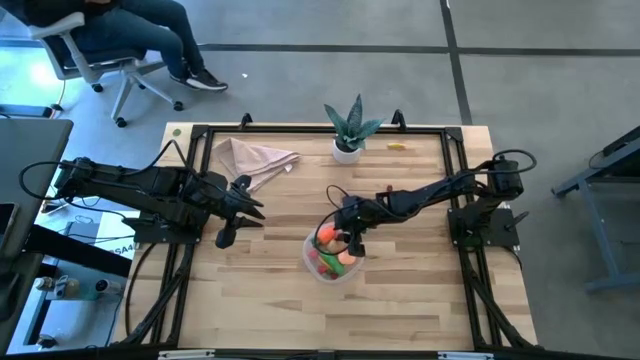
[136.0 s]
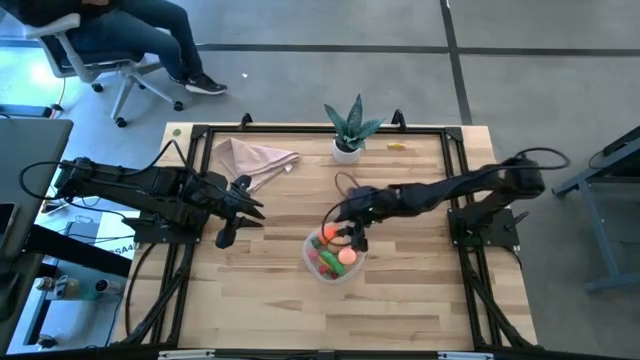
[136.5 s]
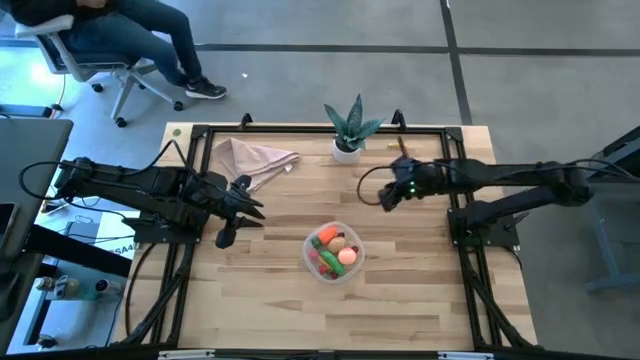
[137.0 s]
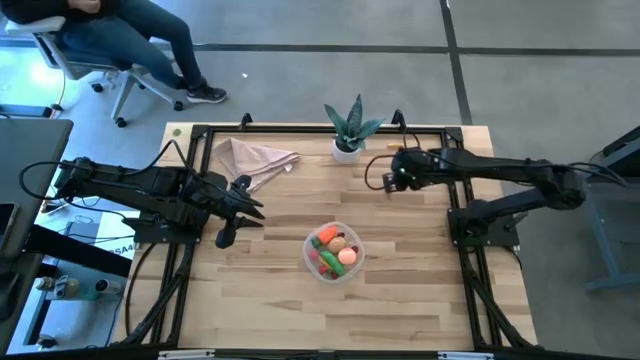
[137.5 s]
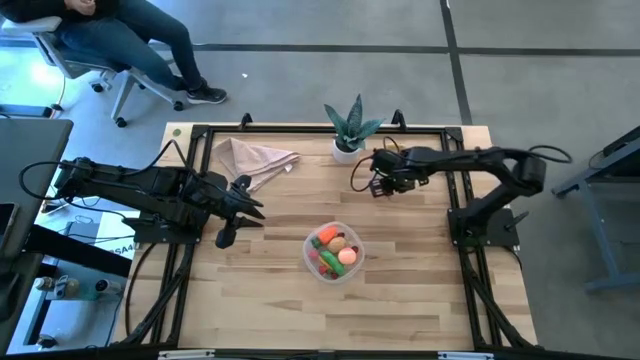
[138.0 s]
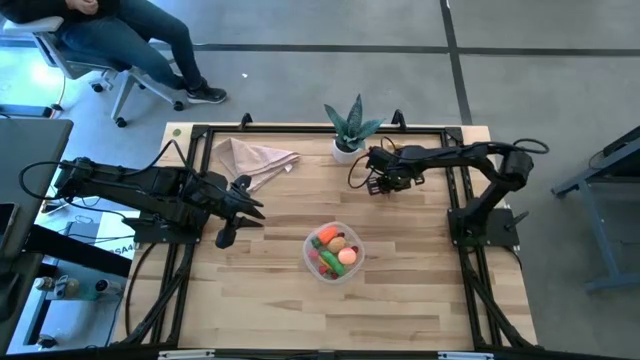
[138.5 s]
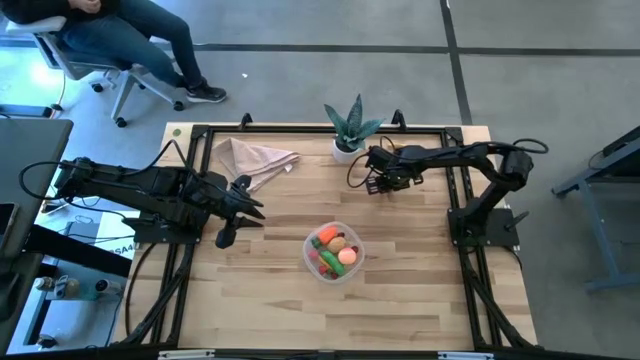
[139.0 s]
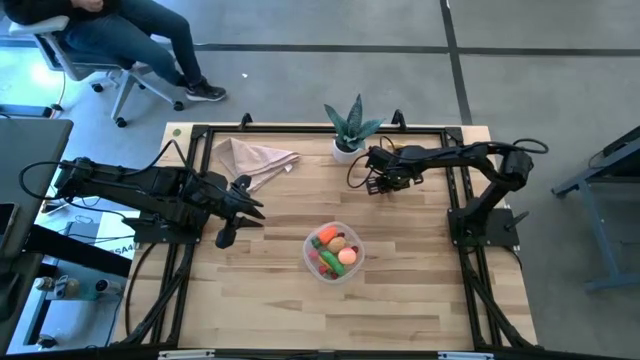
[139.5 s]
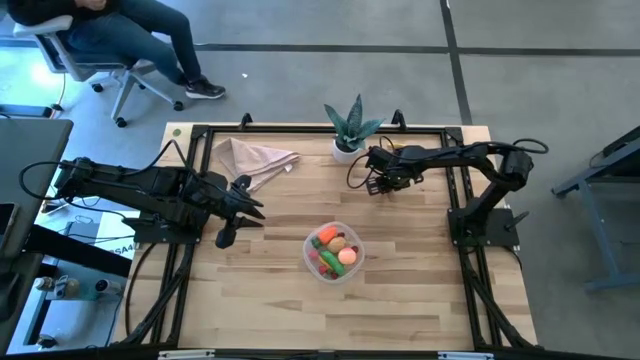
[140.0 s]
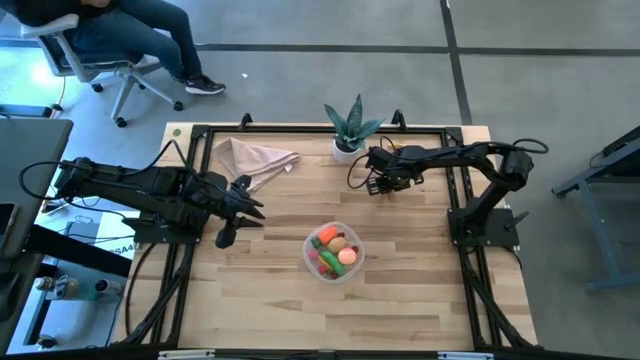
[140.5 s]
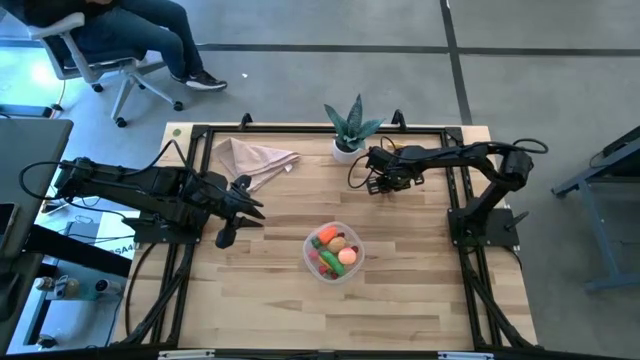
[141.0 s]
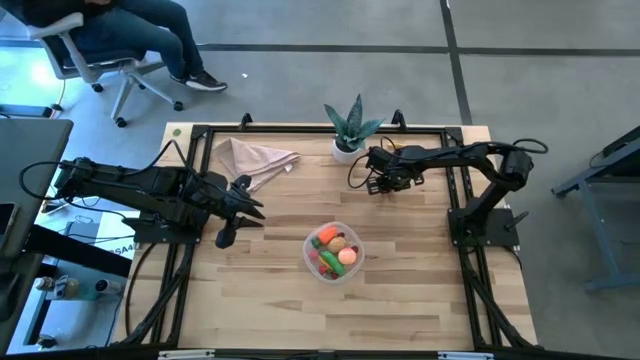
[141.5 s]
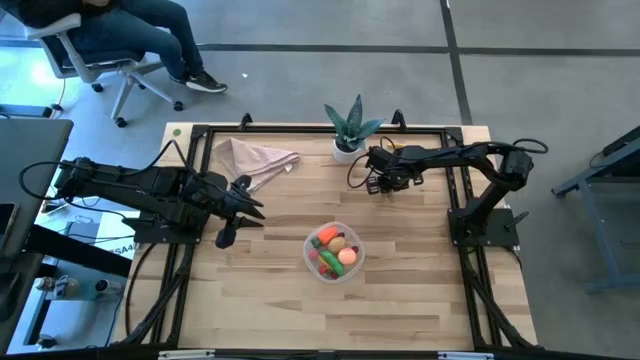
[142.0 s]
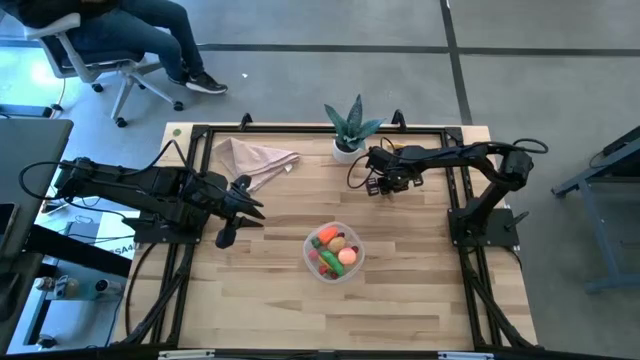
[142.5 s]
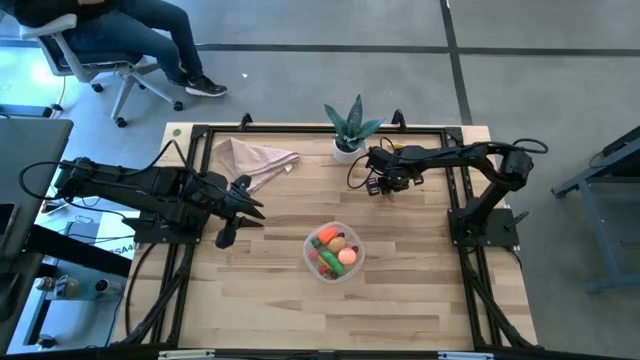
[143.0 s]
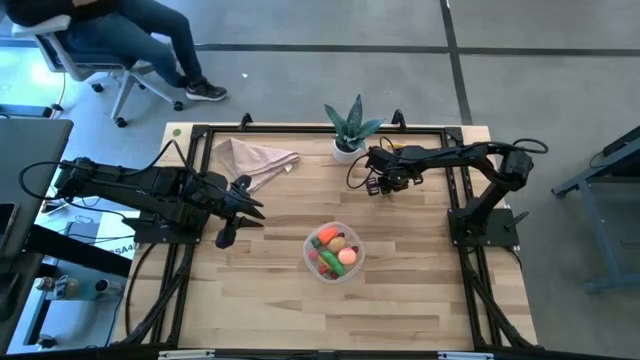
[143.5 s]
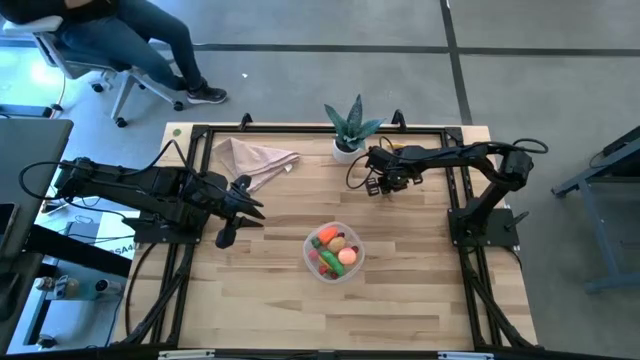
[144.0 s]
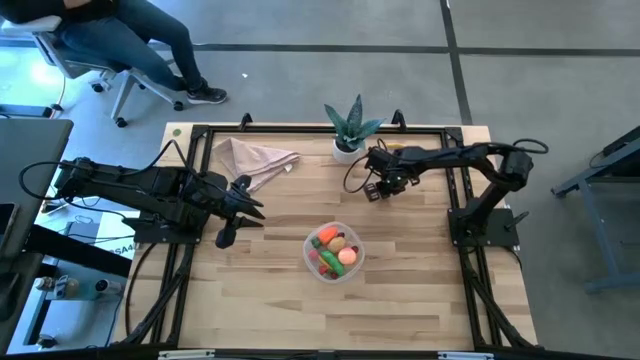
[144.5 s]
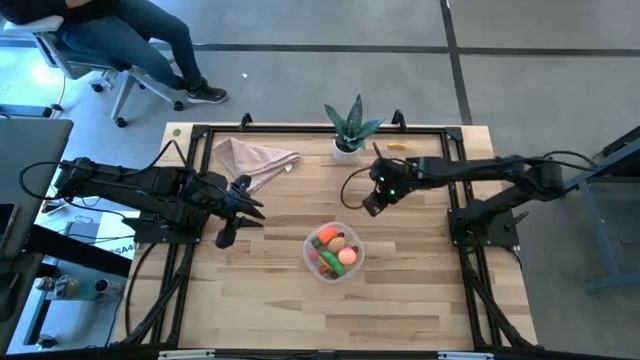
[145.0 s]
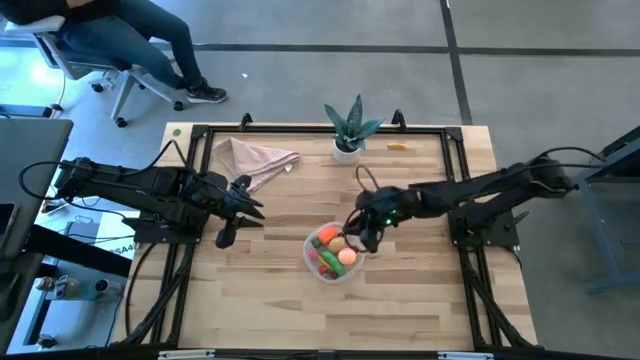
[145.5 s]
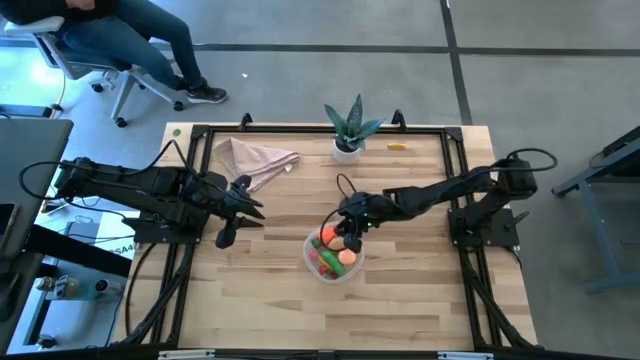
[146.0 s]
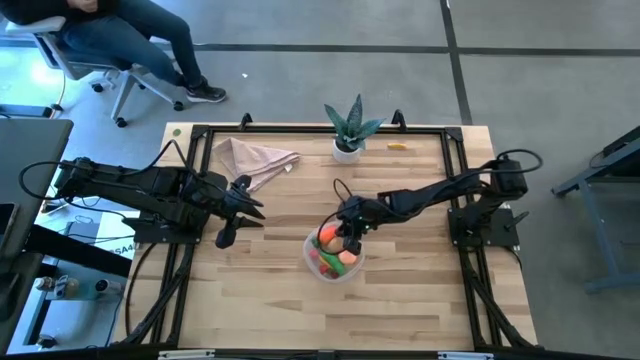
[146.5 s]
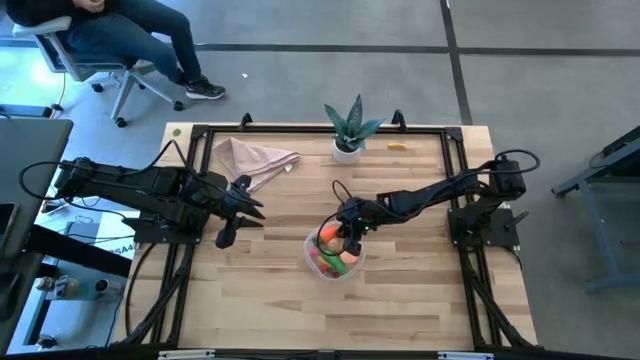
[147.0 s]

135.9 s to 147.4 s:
Task: Pick and placing Produce into tupperware
Put the cherry into the transparent container

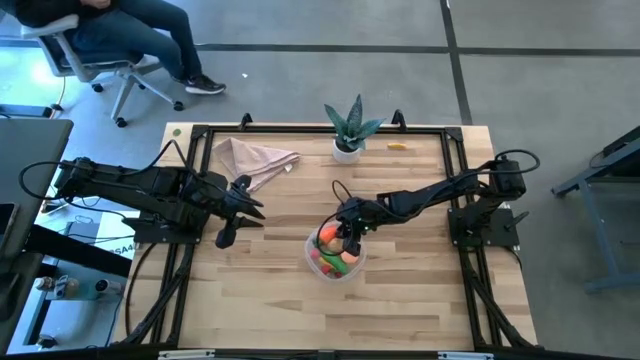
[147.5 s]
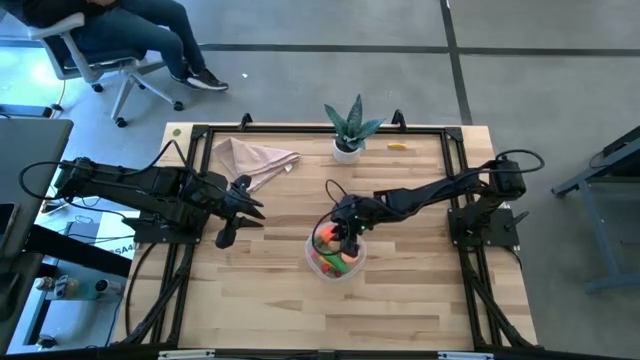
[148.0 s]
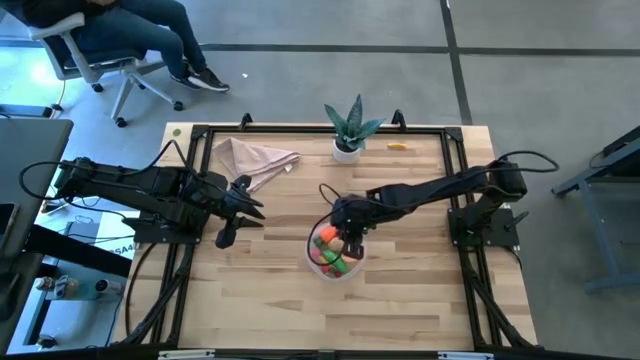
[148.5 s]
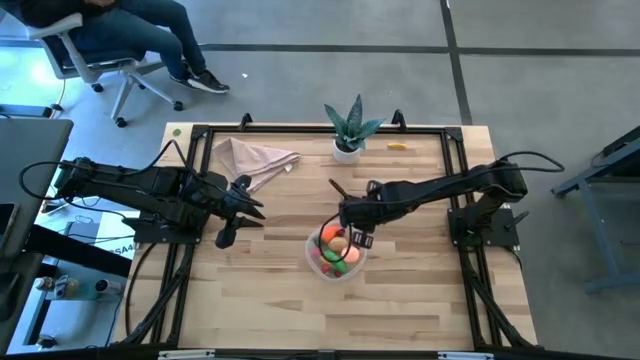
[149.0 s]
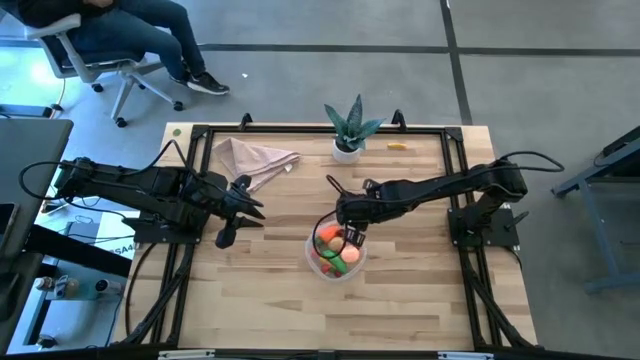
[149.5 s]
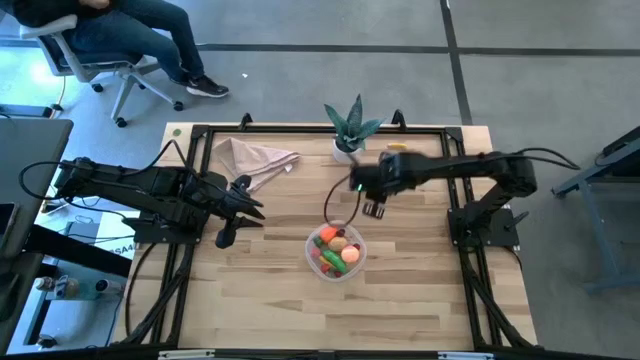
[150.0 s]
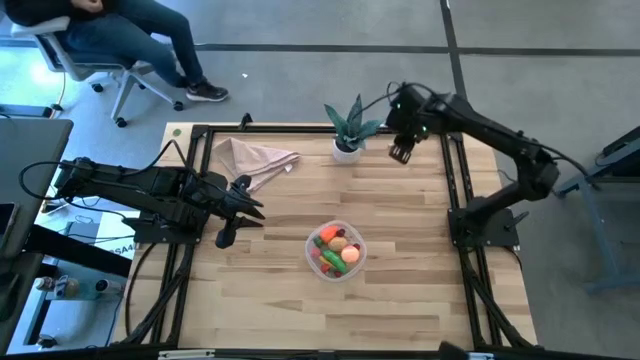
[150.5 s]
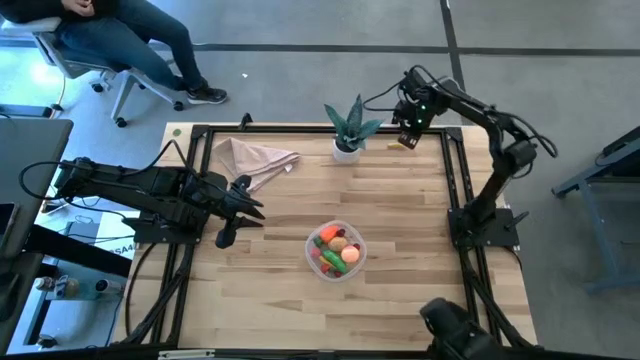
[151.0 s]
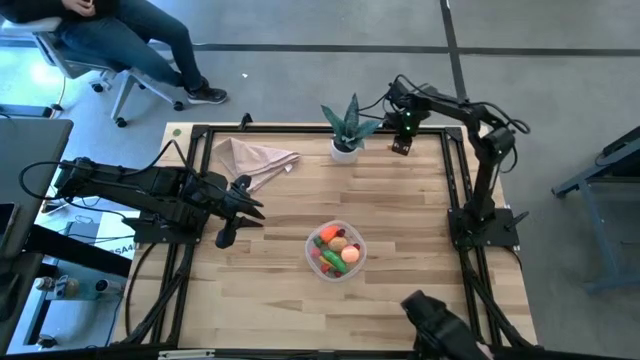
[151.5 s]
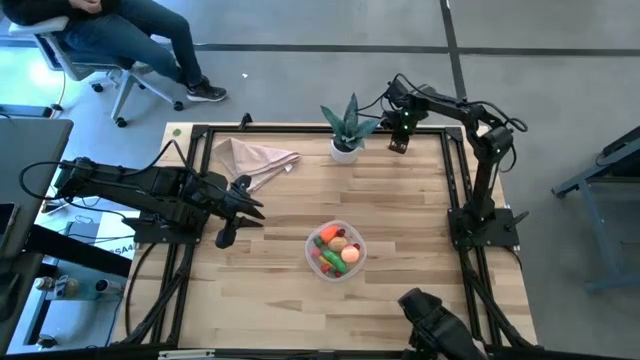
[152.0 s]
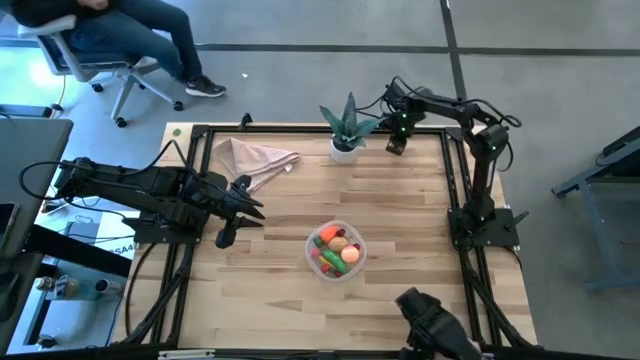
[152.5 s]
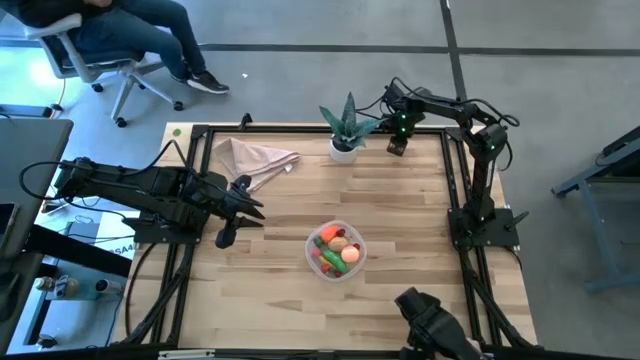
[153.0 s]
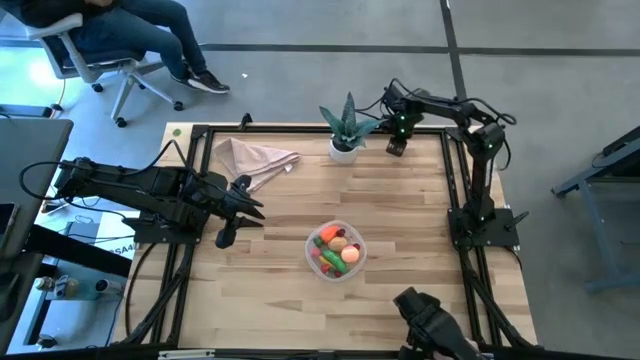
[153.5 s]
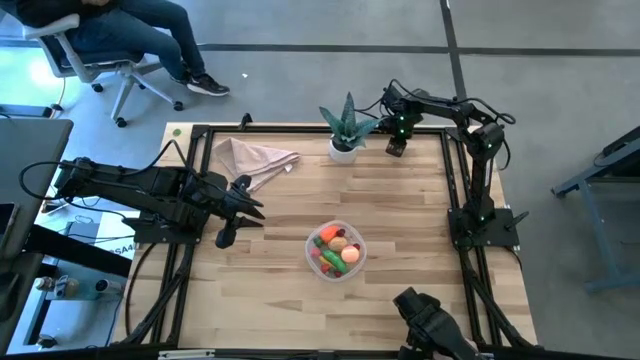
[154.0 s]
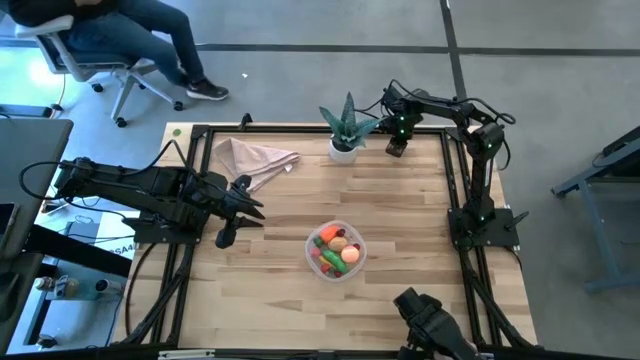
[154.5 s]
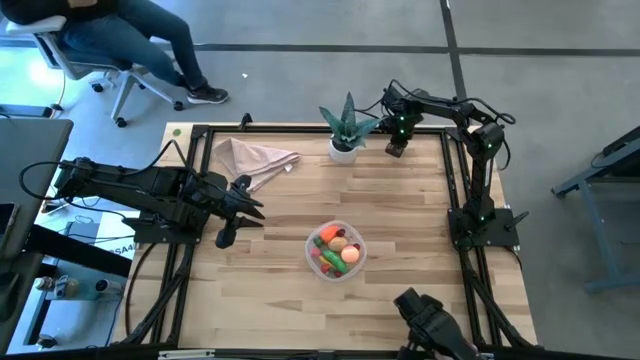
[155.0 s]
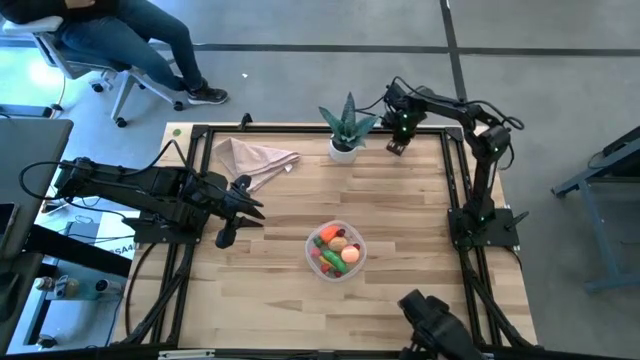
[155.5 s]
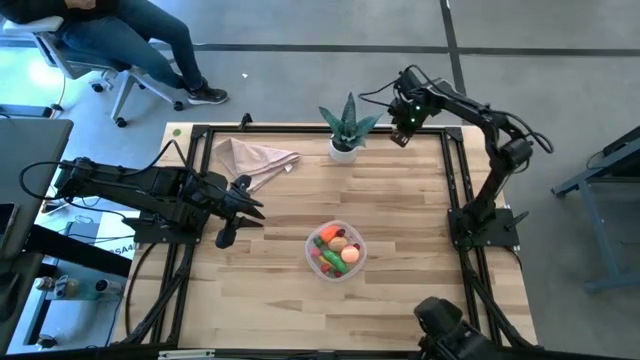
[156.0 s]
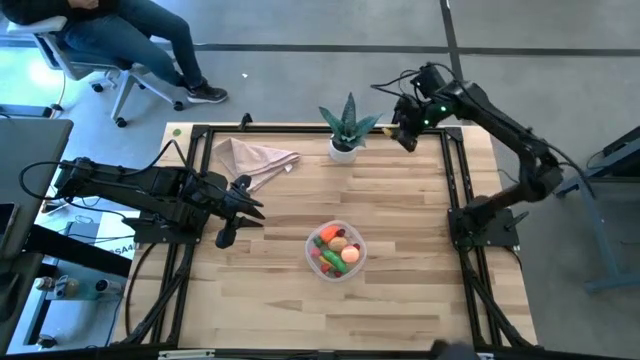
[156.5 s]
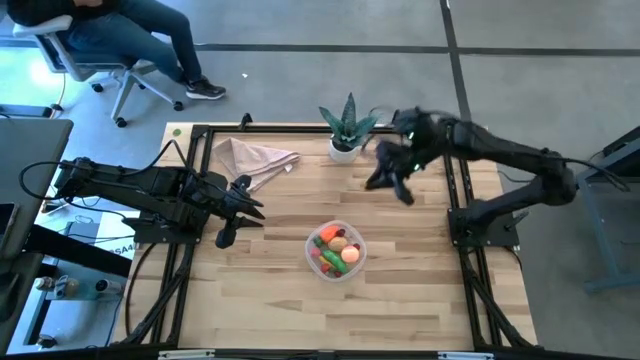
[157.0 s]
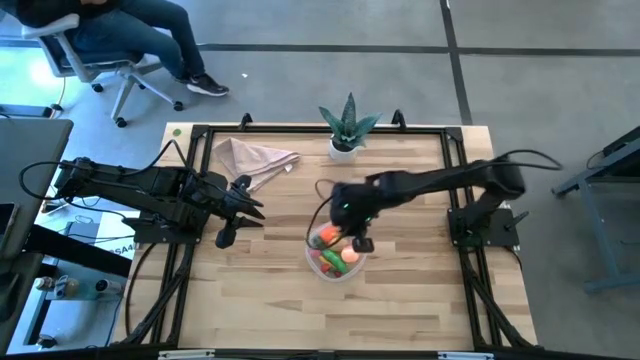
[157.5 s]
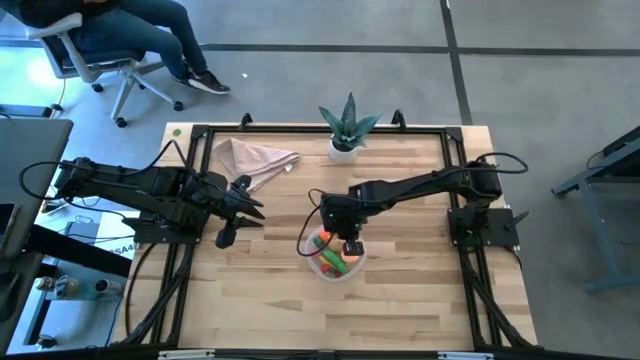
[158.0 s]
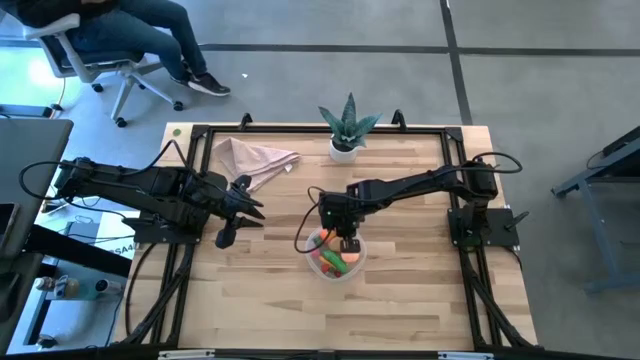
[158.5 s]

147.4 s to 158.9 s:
Put the corn into the transparent container
